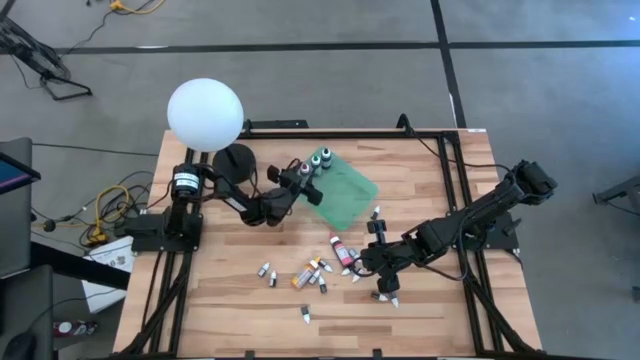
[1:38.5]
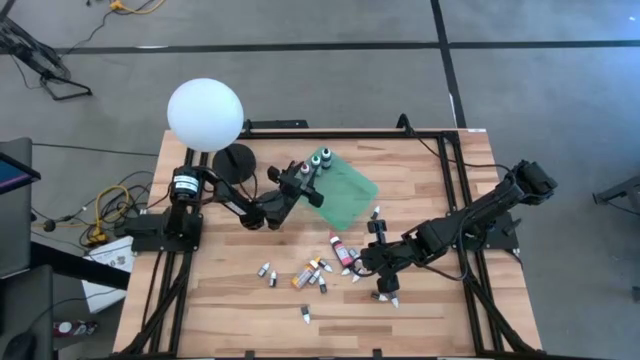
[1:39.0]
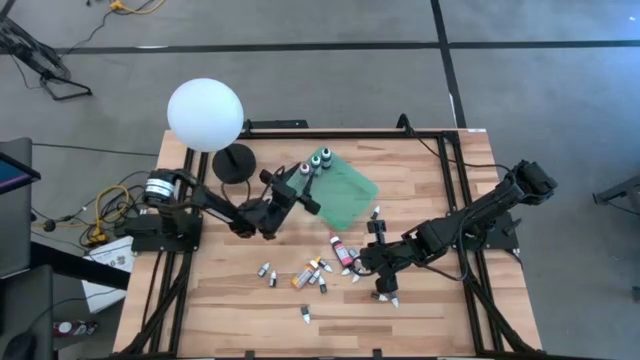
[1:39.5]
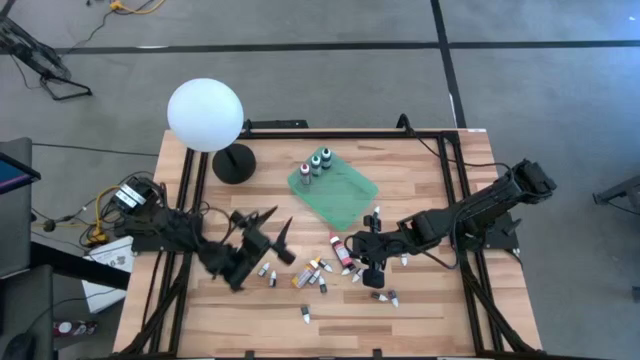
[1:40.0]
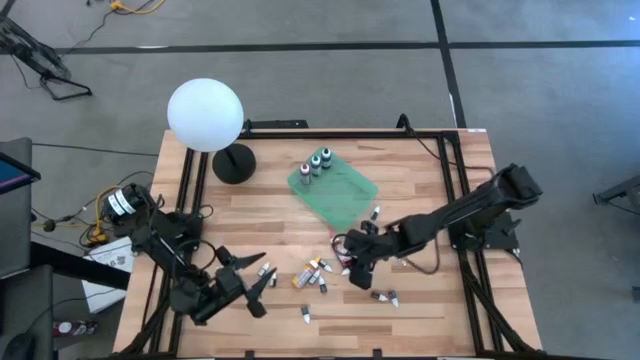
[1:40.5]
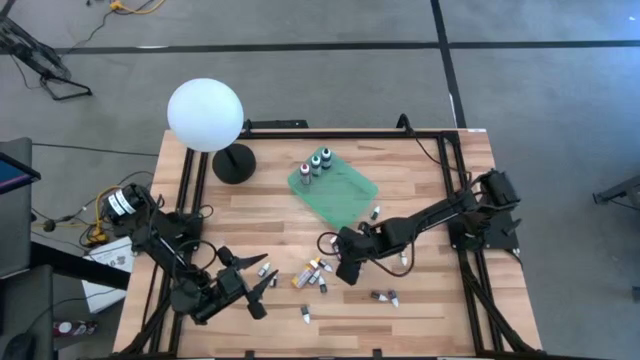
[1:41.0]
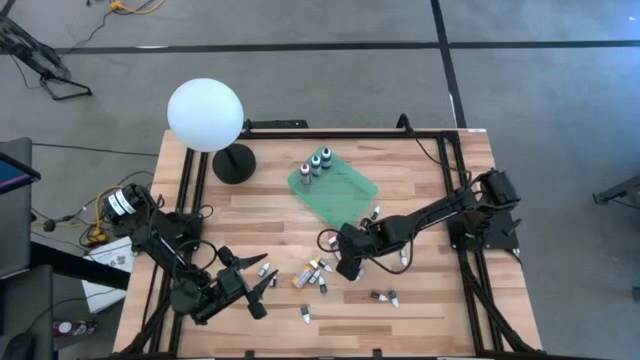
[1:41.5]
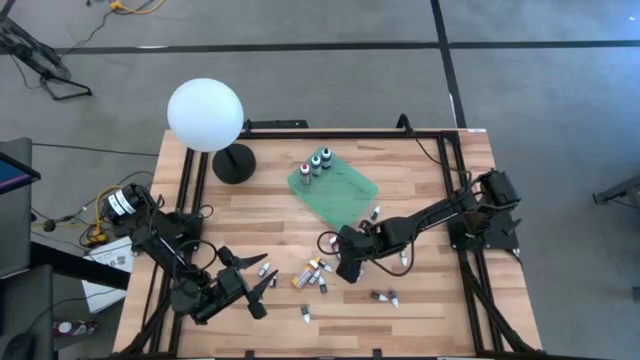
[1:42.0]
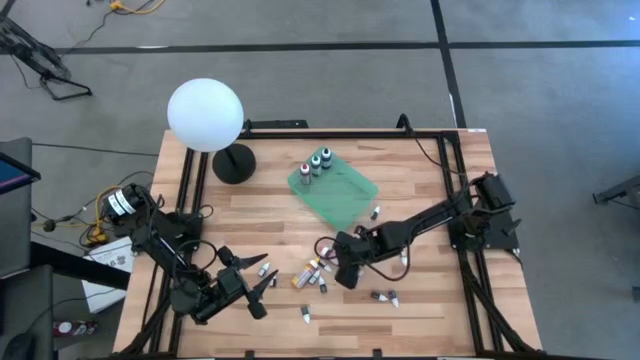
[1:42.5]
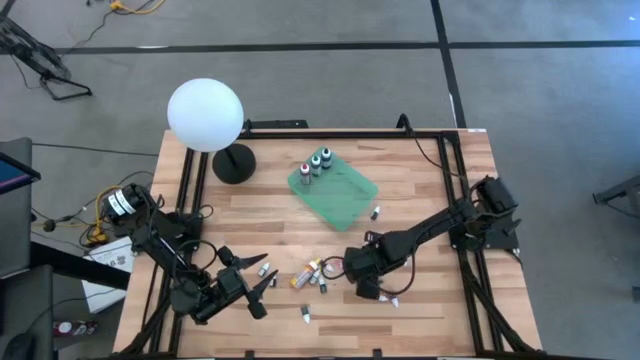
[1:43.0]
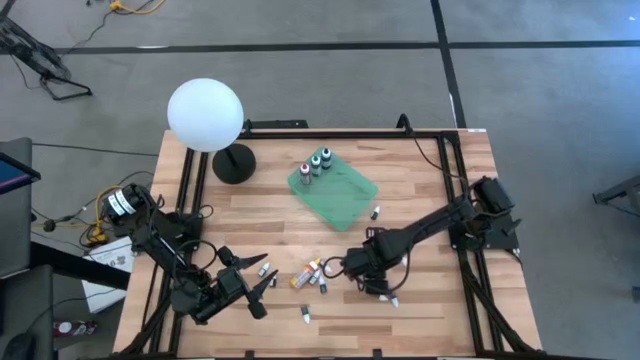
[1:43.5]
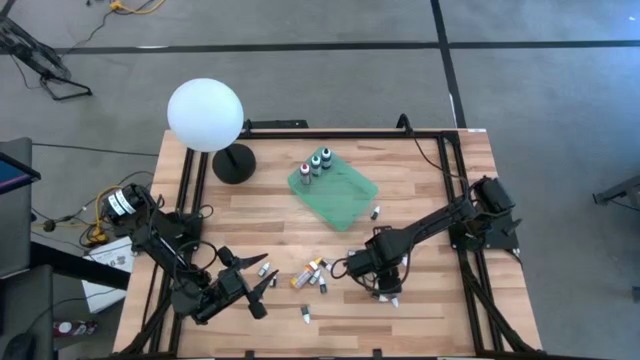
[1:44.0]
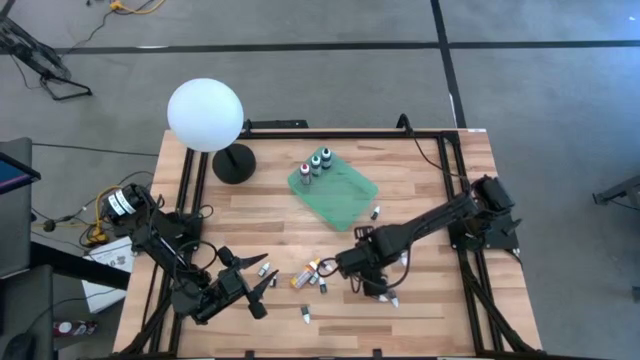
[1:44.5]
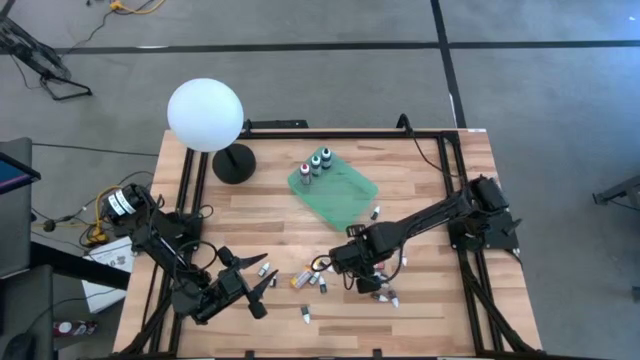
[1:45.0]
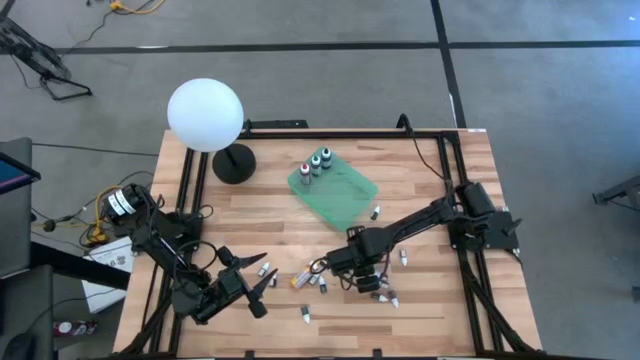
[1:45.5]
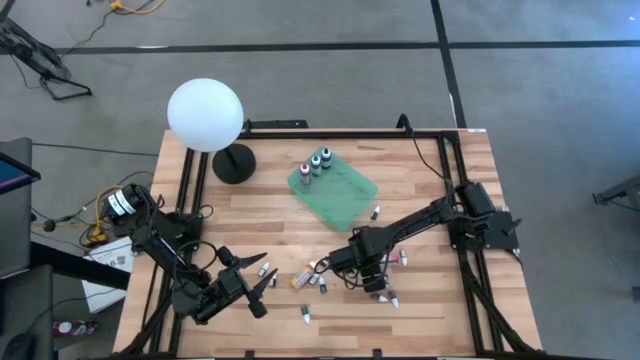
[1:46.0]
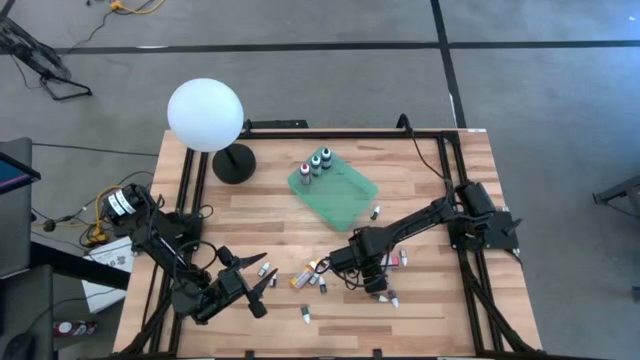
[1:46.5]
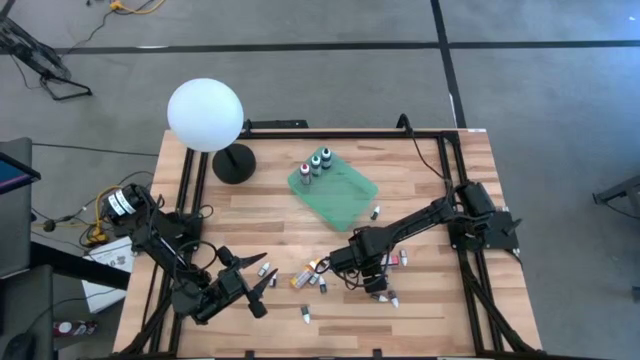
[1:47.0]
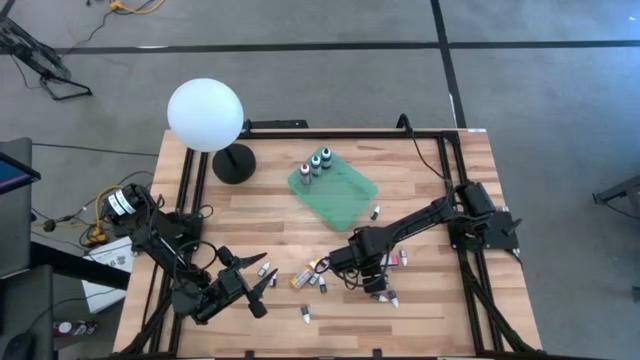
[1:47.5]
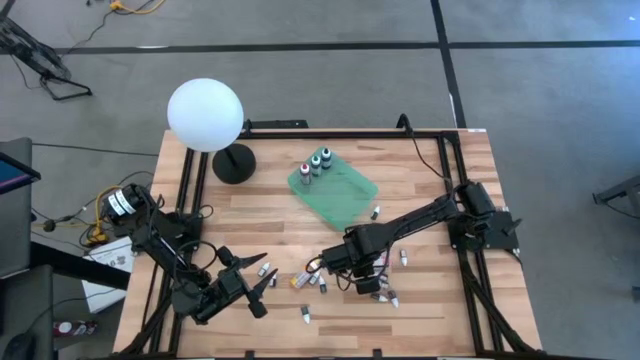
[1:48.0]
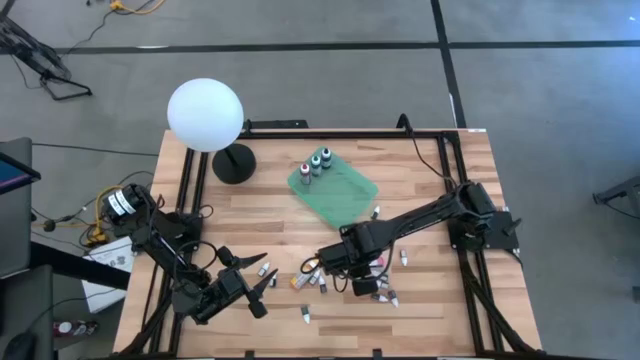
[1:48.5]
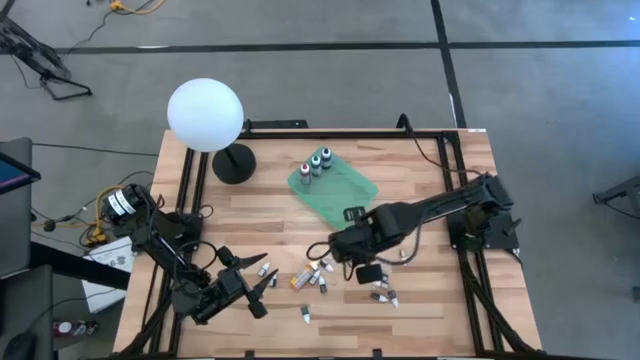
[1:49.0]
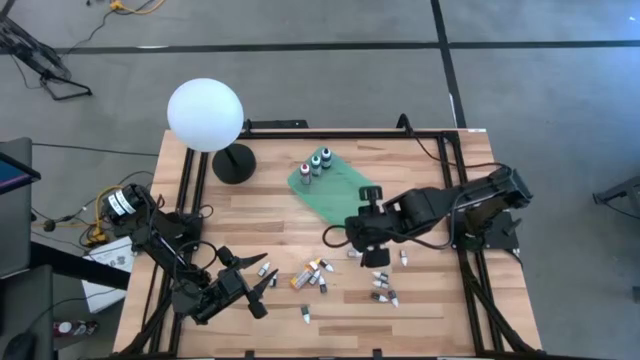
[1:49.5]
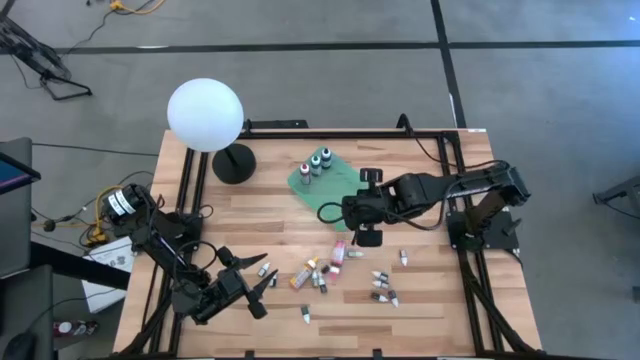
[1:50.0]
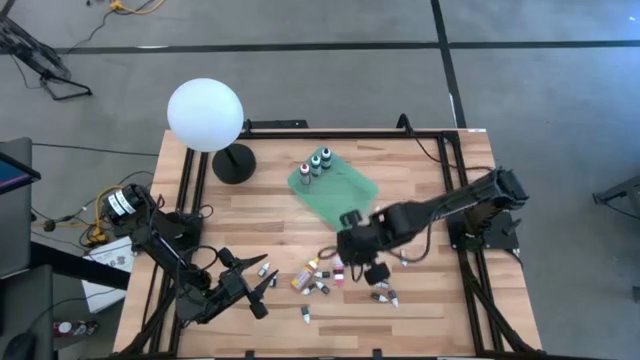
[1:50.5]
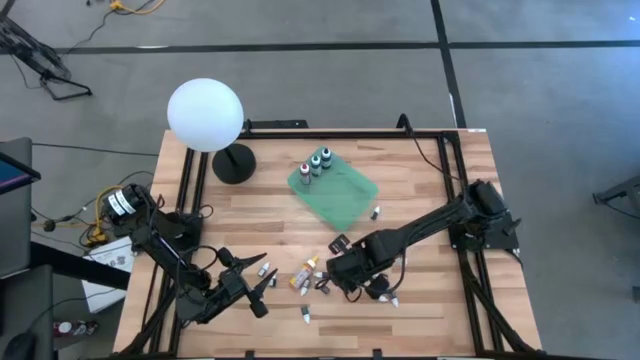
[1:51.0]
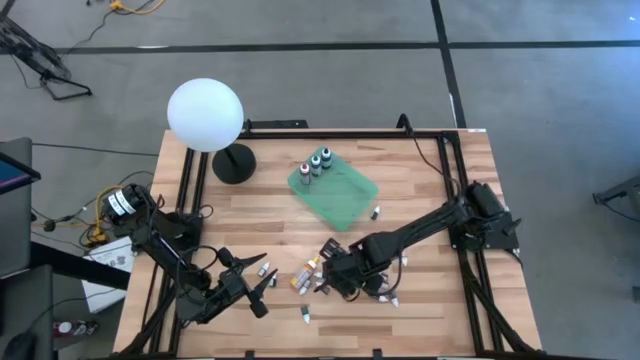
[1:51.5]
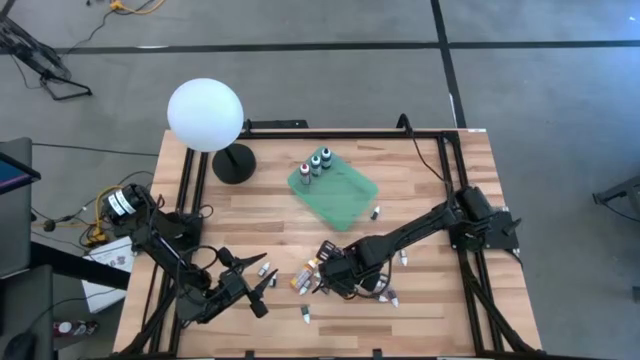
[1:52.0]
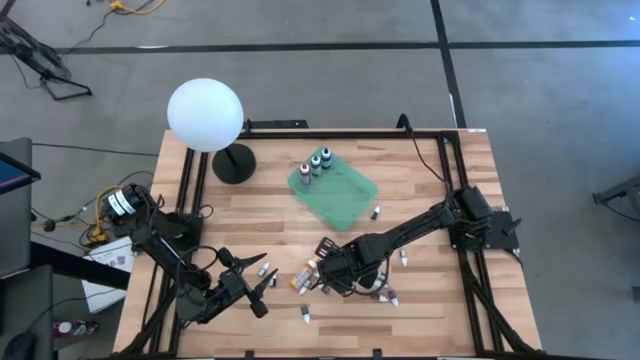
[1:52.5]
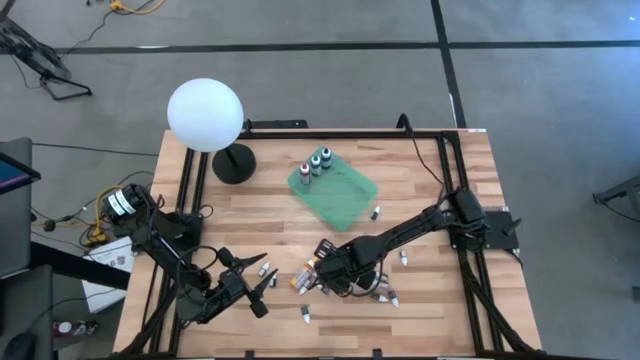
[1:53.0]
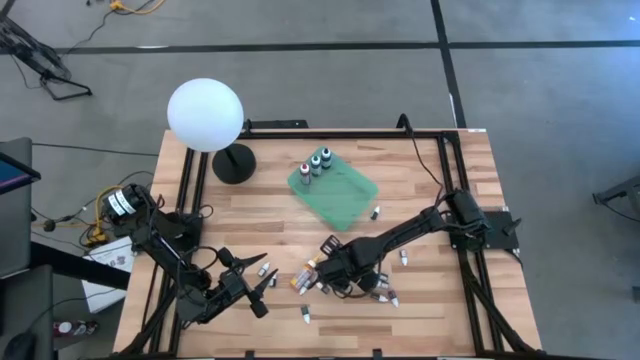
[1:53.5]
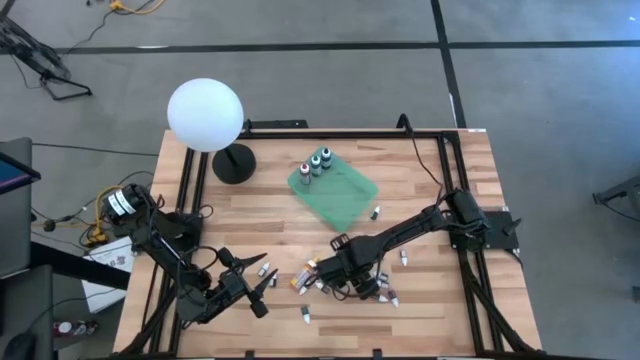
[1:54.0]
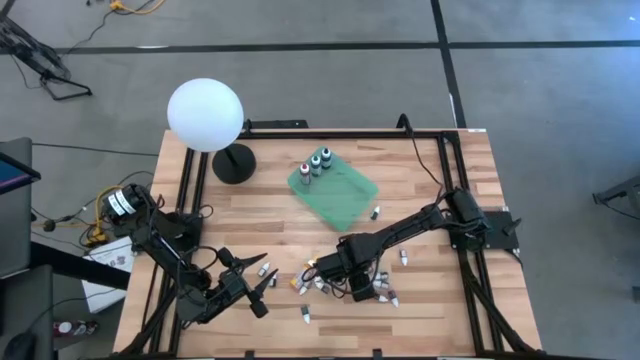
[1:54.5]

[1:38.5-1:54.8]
Task: Pick & Place food coloring
Put the large pink food coloring bottle into the green bin

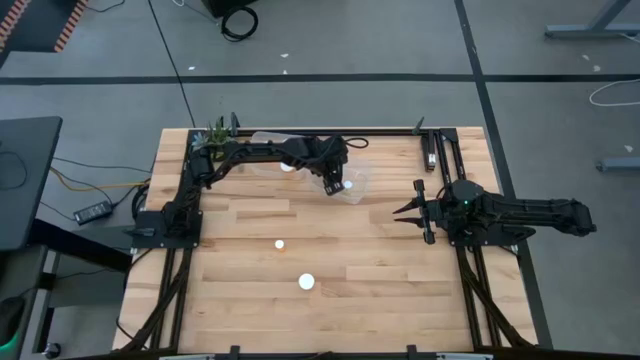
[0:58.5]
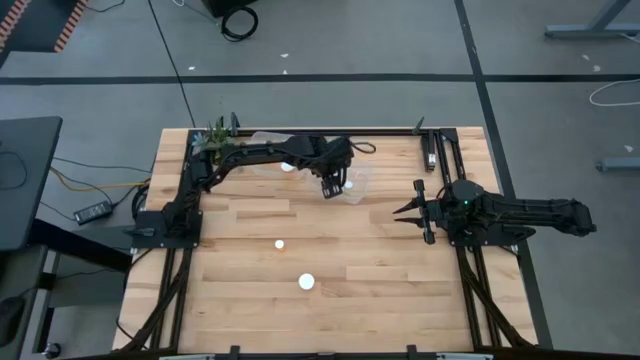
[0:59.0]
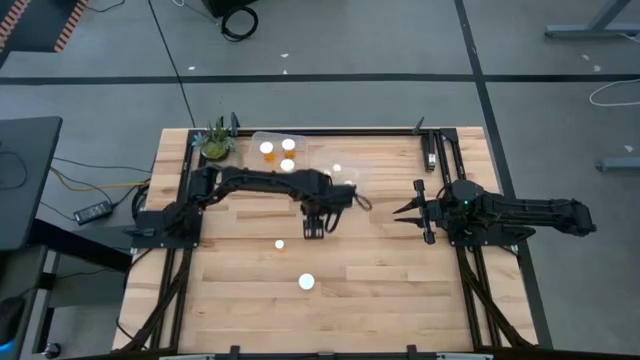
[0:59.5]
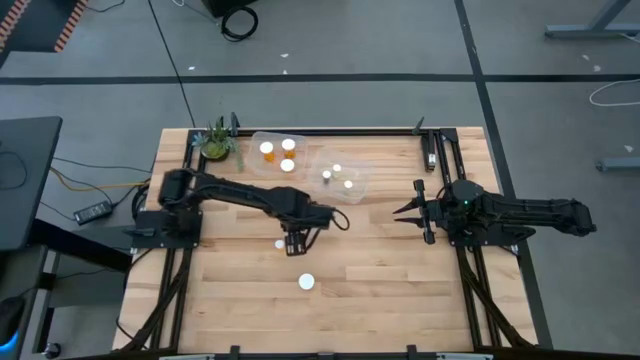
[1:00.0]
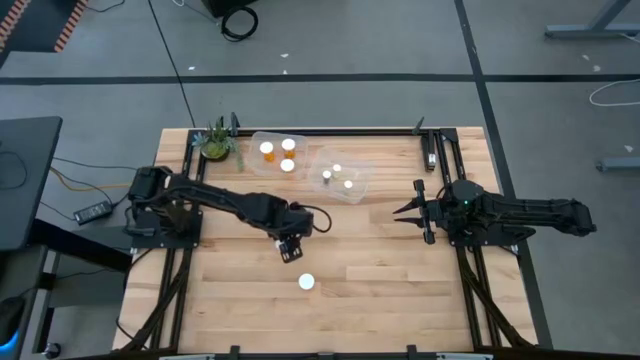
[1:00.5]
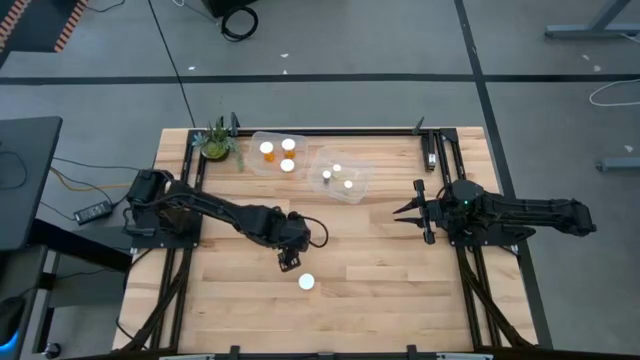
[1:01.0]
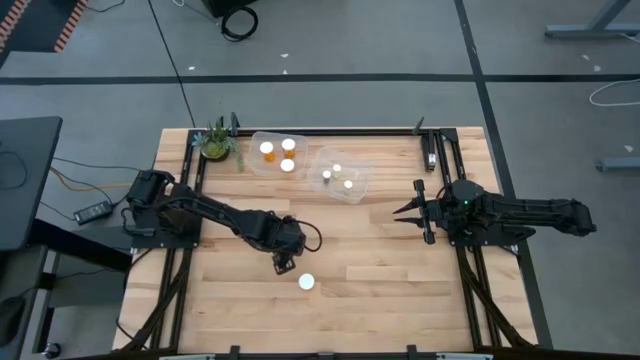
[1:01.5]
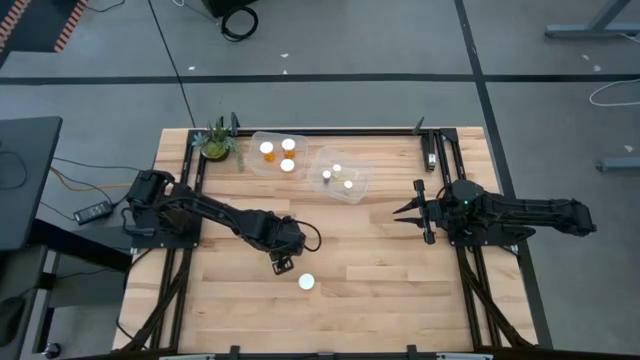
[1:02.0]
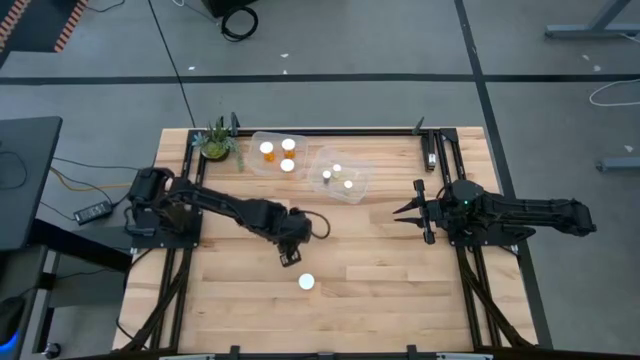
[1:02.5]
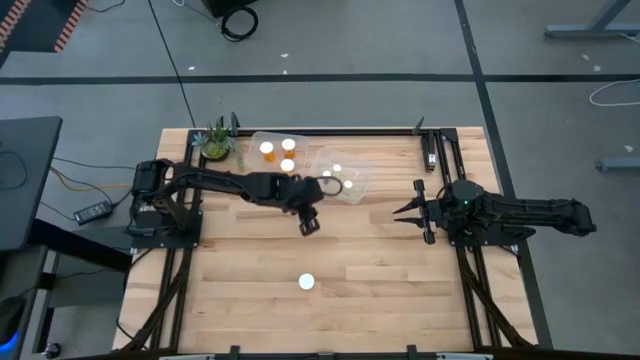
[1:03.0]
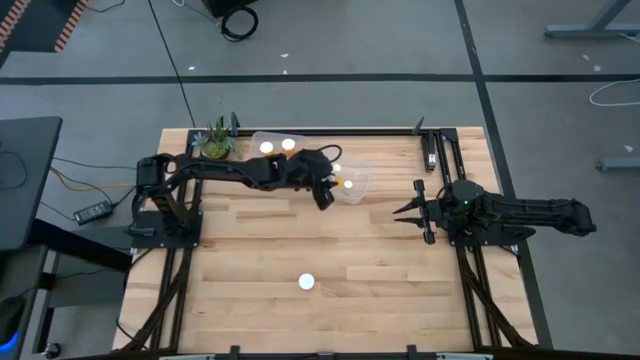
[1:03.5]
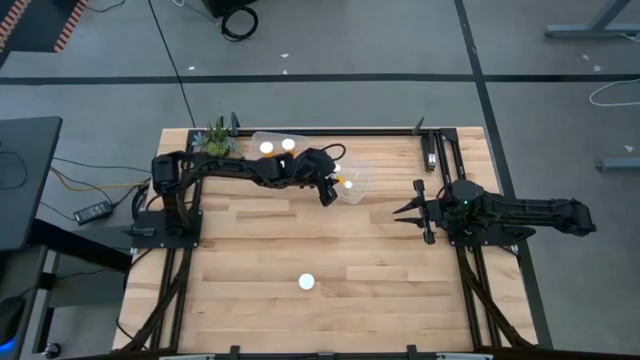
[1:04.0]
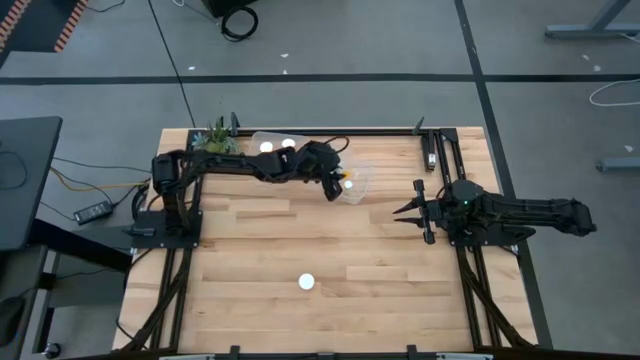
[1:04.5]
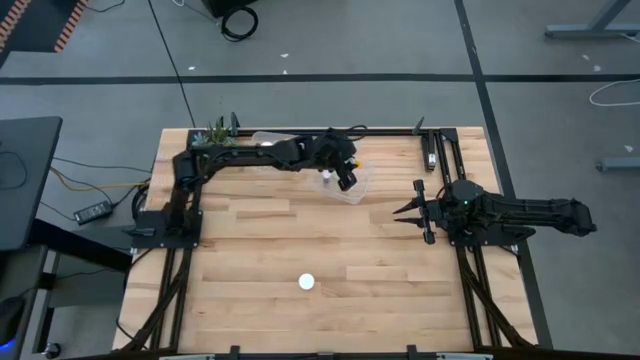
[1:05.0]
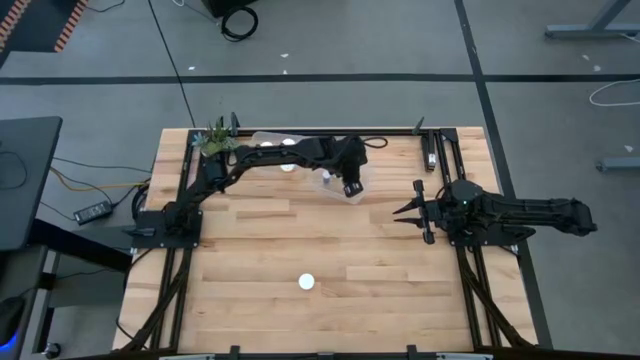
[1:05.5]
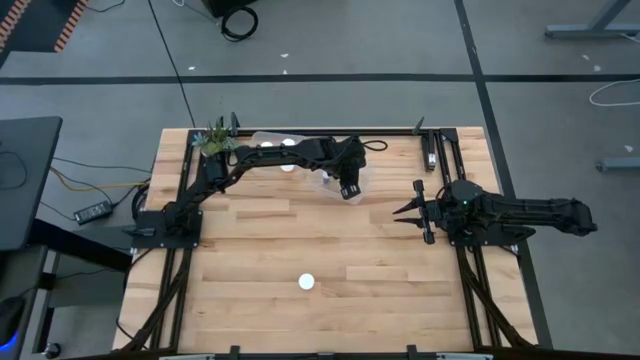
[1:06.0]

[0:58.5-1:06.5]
Task: Pick and place medicine bottles into bin by pill shape (circle, oval)
Put the small orange pill bottle into the right transparent bin
